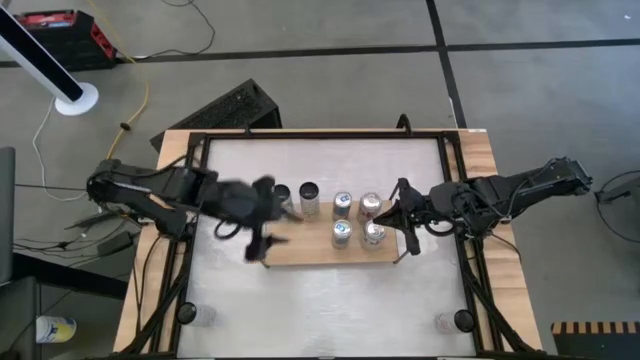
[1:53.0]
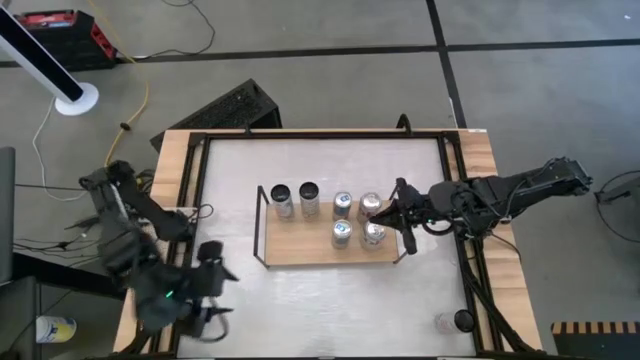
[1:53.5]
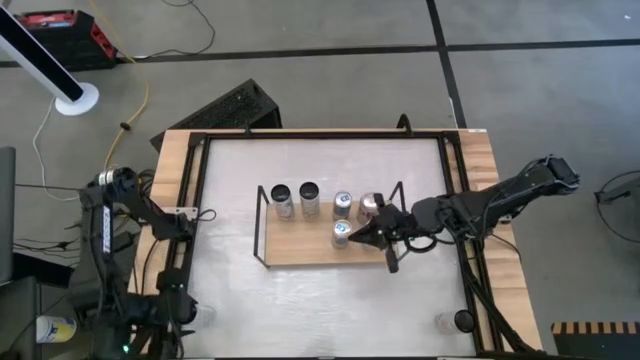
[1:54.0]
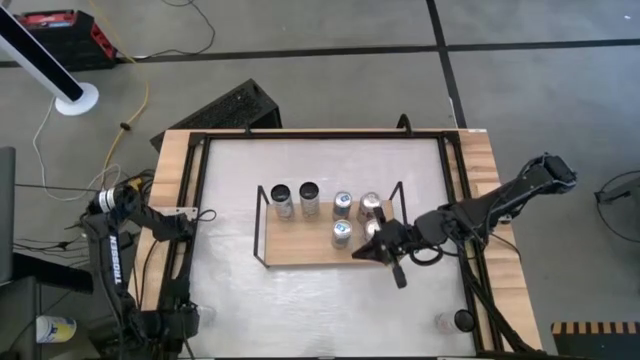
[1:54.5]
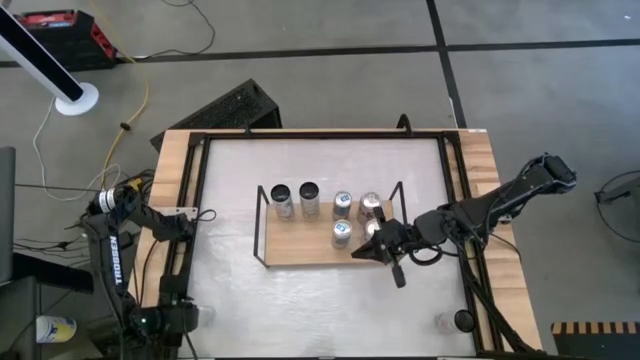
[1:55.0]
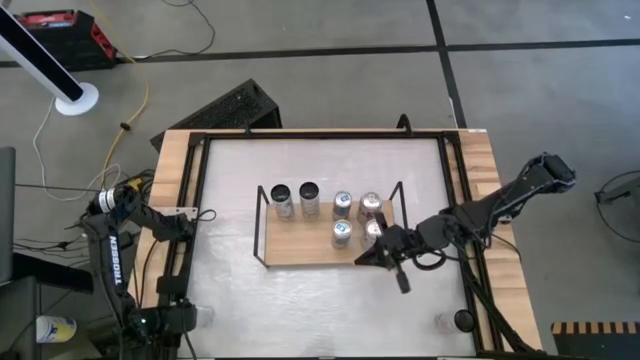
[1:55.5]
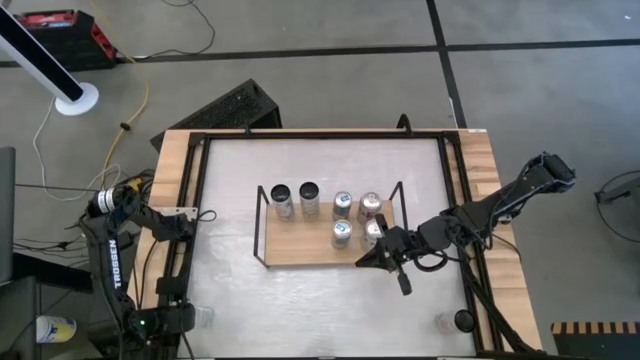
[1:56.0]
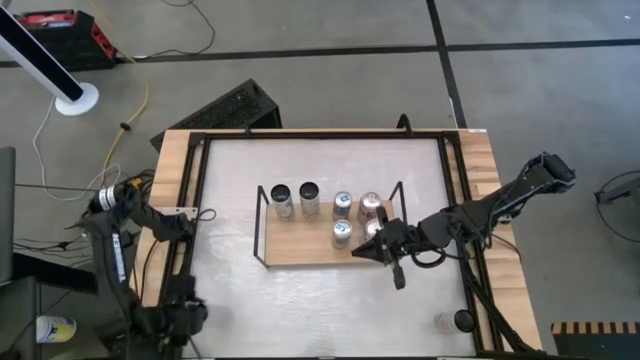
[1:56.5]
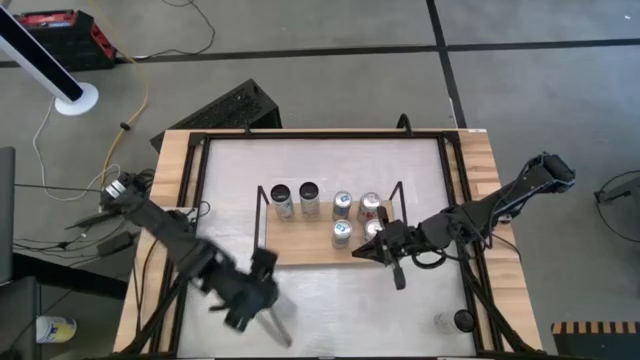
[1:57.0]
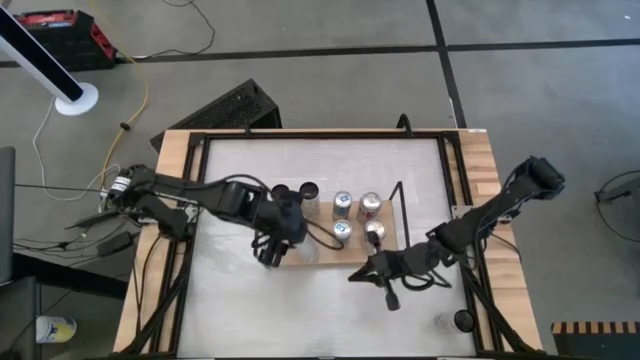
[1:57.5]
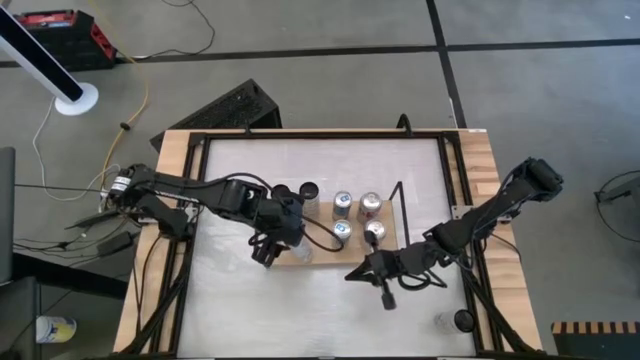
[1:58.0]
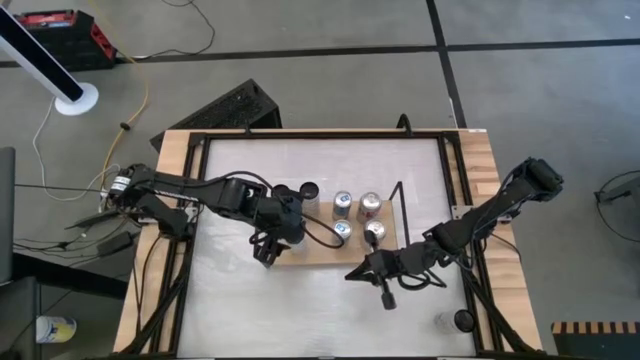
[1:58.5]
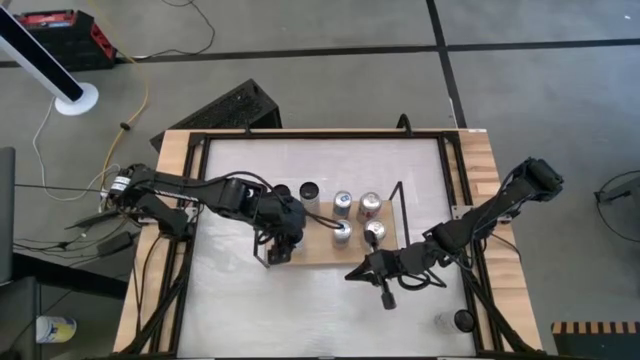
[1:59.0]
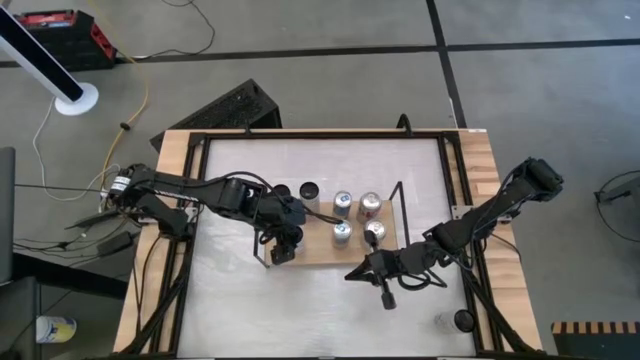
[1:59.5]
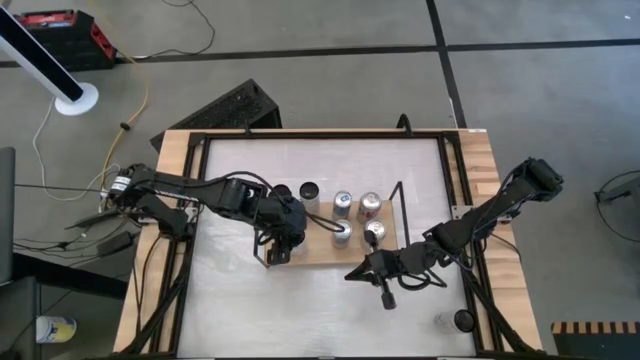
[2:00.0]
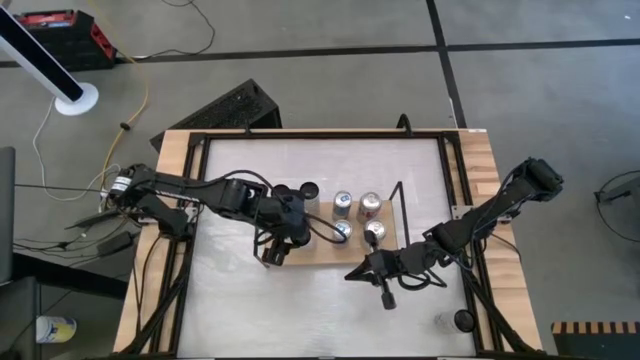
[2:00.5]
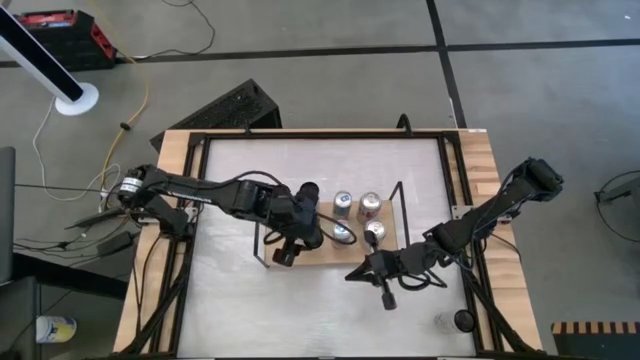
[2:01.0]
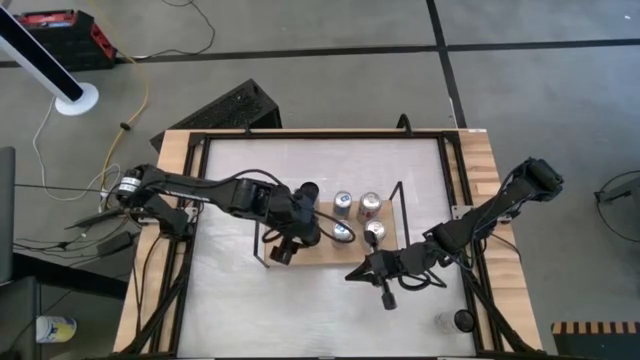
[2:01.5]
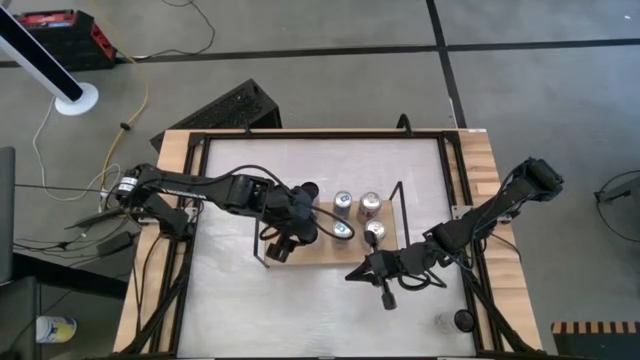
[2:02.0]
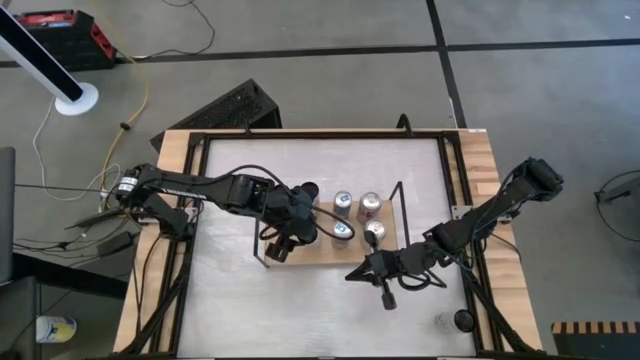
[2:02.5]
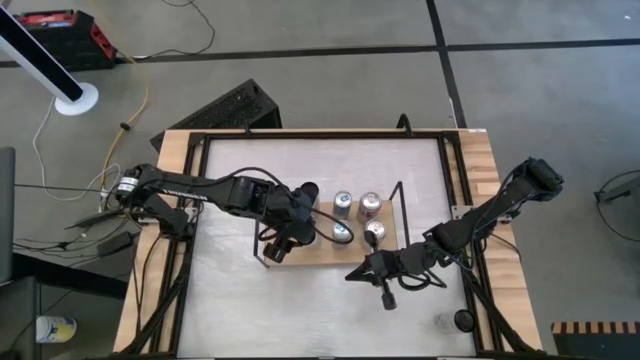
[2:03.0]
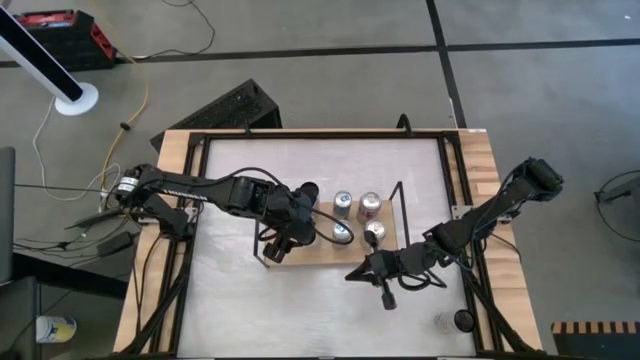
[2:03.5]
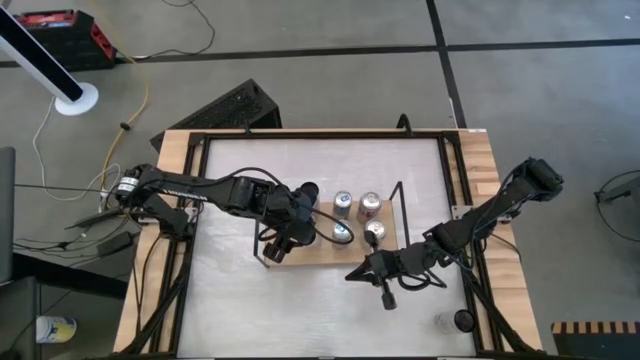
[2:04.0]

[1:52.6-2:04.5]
Task: Place canned beverage on shelf
Put the white yellow soda can on the shelf aligned with the other white yellow soda can

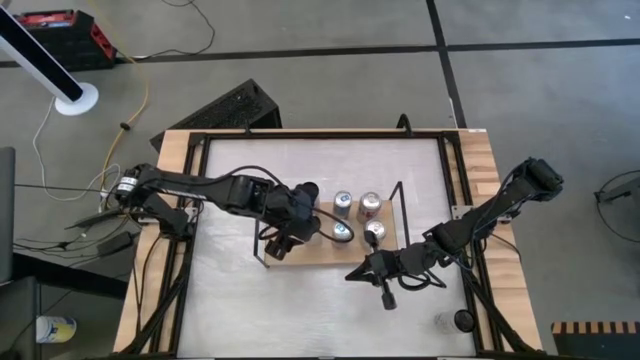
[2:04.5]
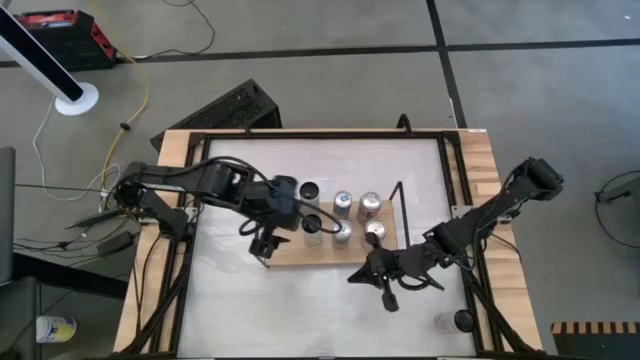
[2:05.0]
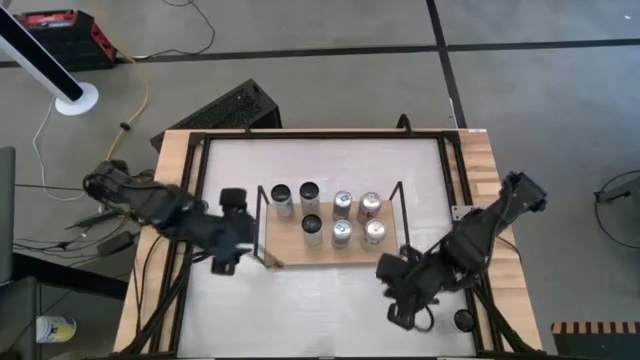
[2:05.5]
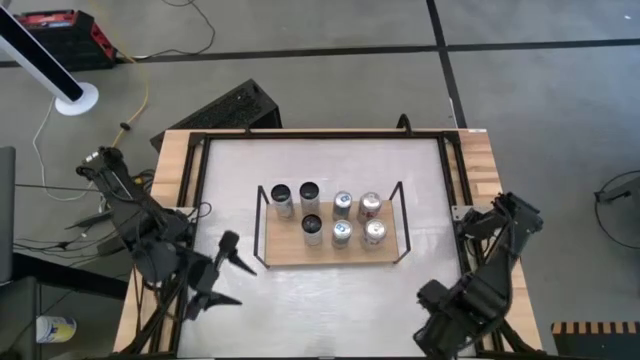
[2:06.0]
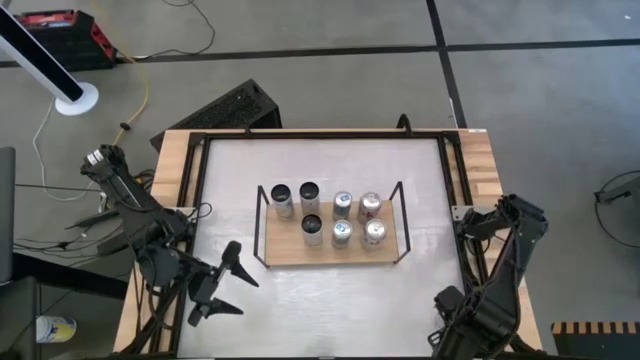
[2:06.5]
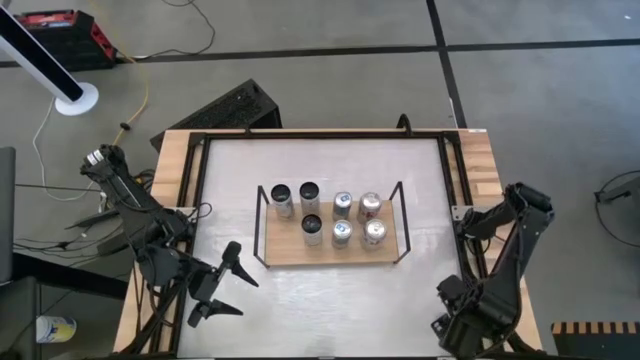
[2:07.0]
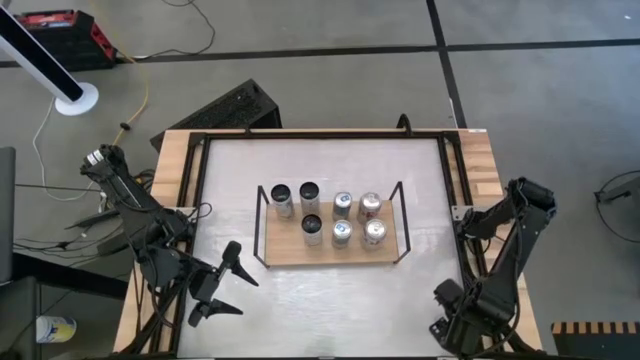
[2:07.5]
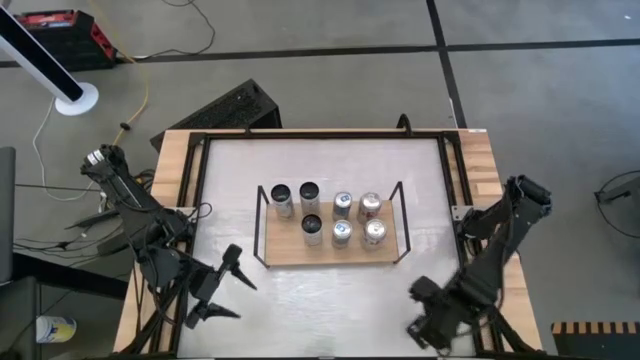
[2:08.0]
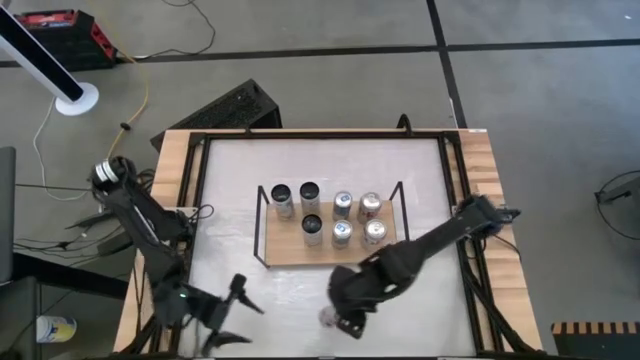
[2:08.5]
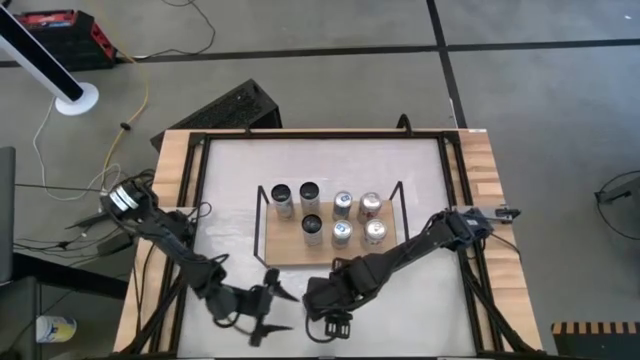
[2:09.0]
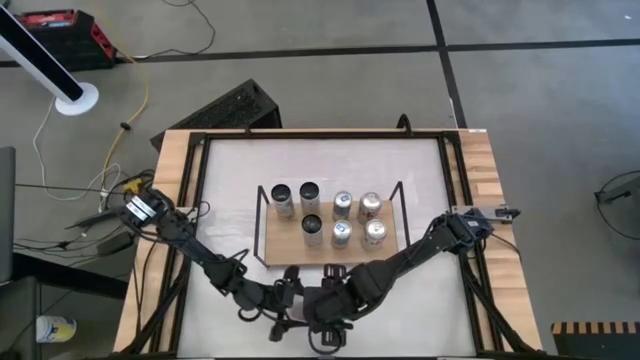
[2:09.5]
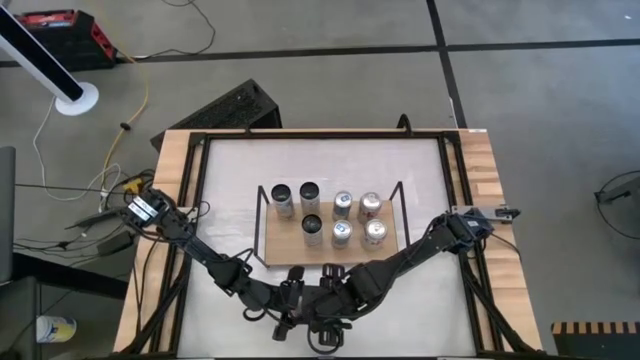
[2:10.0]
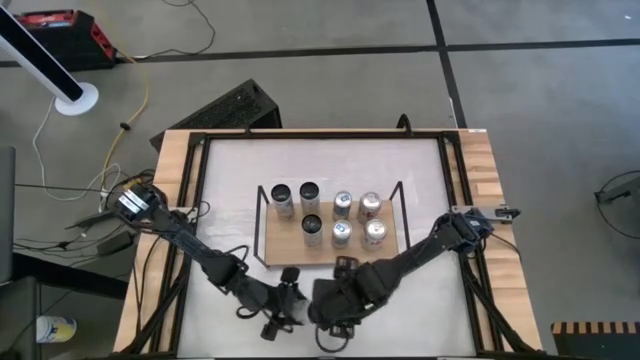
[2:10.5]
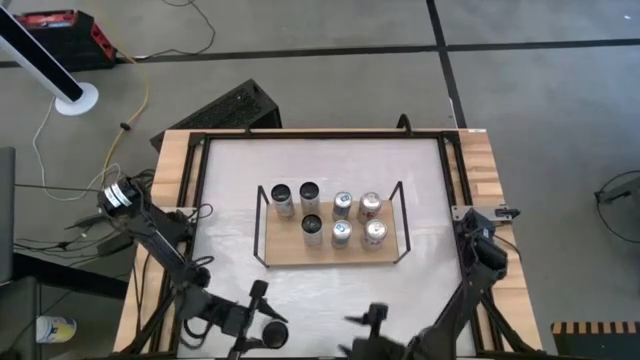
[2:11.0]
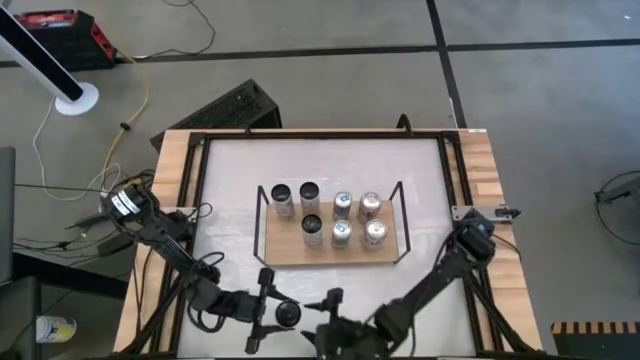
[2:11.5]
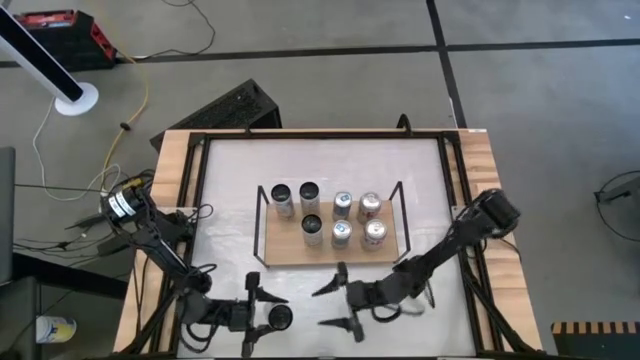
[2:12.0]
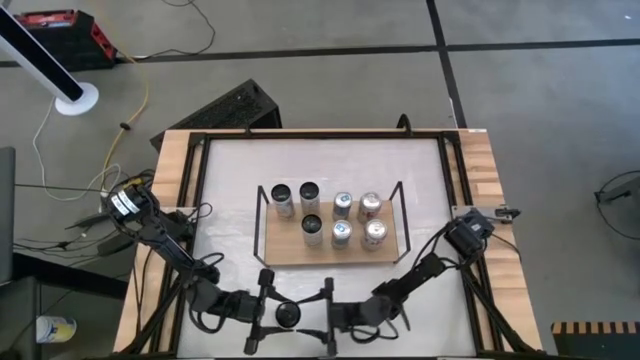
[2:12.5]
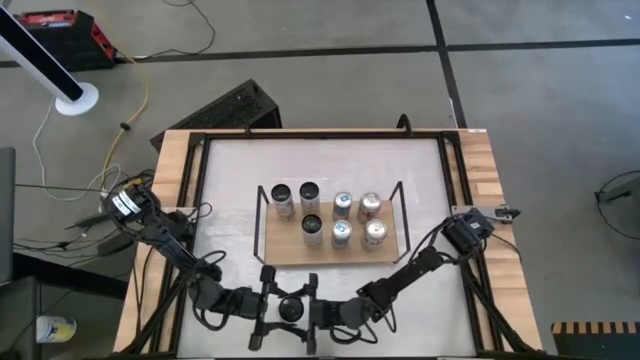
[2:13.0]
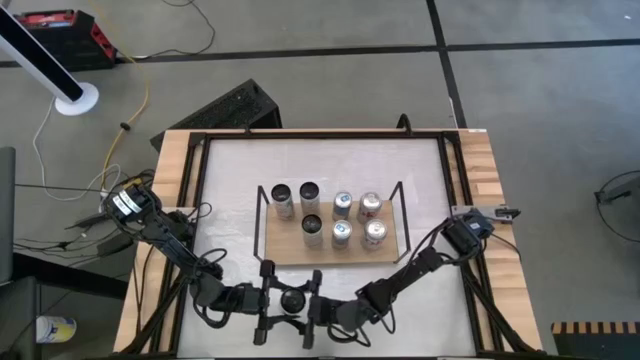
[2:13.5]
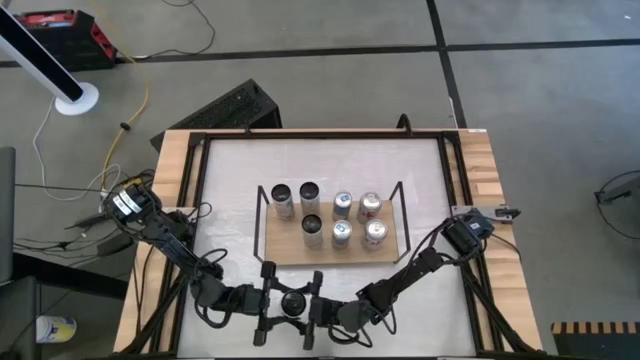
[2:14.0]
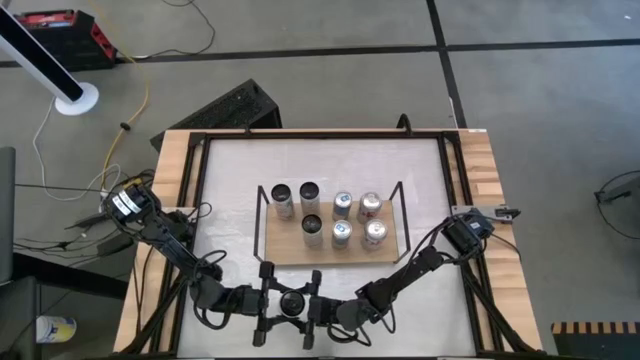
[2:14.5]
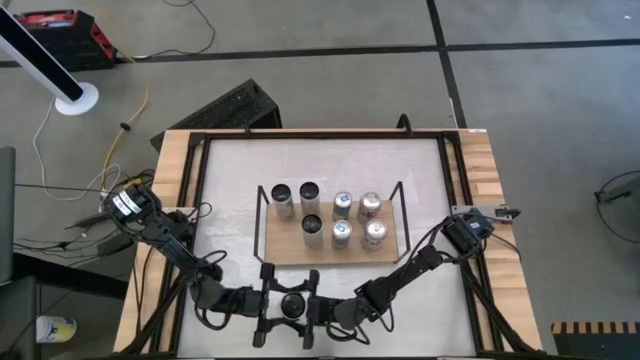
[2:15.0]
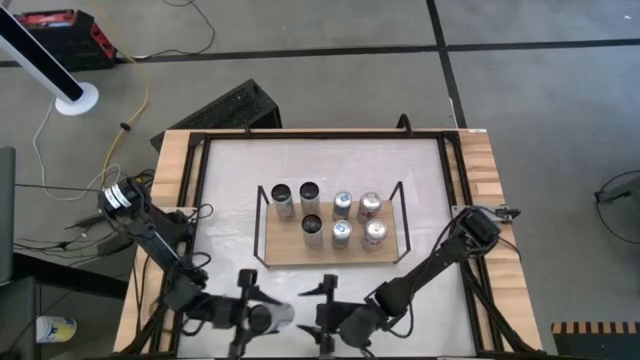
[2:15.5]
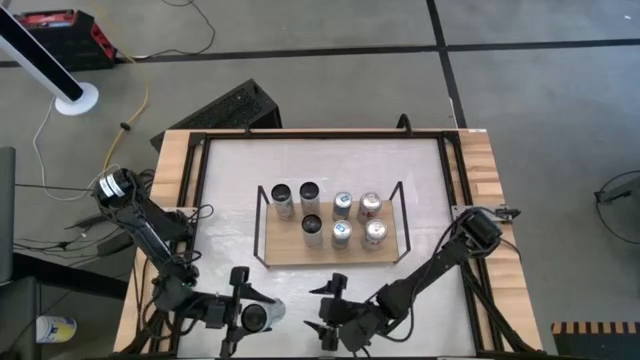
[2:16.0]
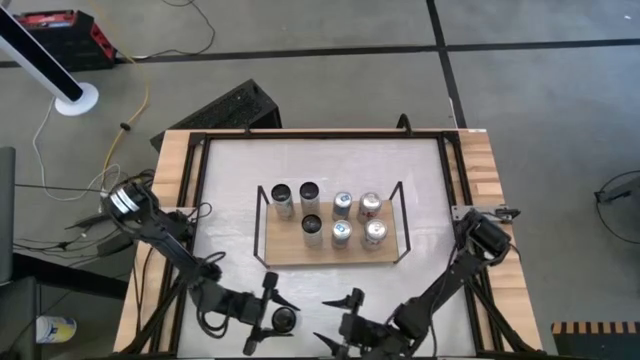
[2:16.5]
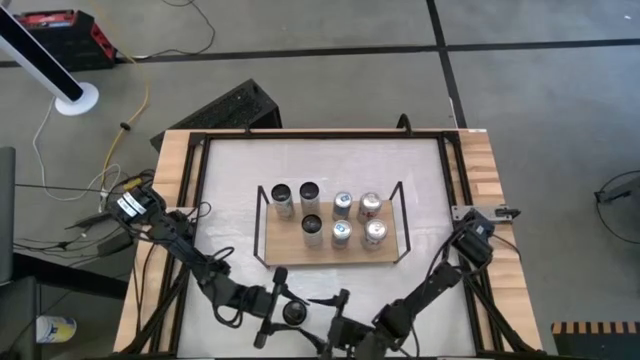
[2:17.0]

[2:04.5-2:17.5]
Put the white pink soda can on the shelf aligned with the other white pink soda can
